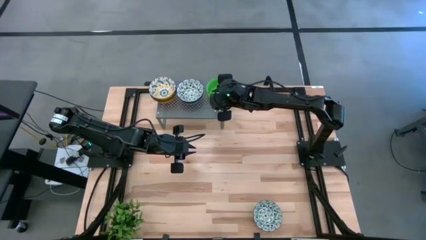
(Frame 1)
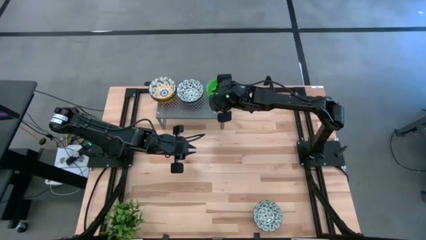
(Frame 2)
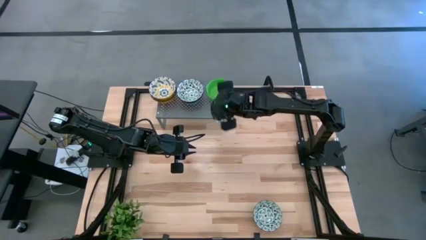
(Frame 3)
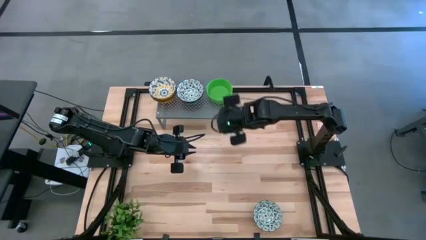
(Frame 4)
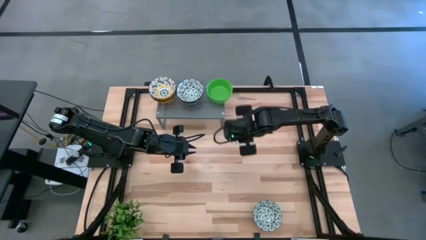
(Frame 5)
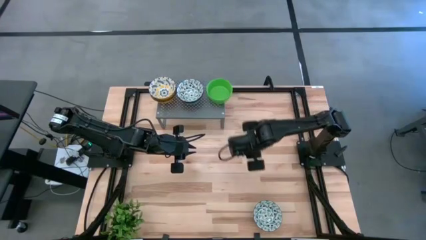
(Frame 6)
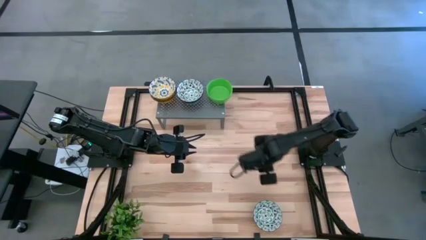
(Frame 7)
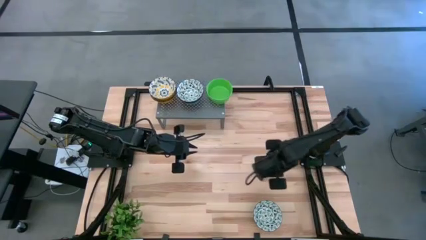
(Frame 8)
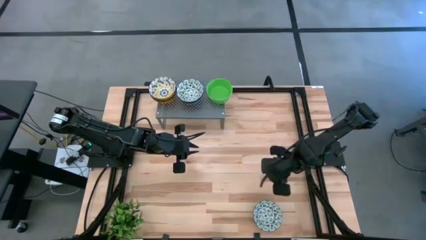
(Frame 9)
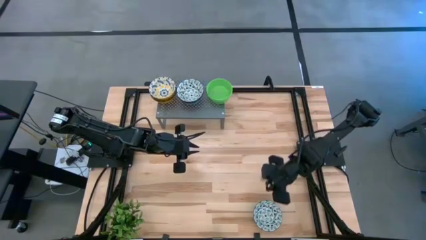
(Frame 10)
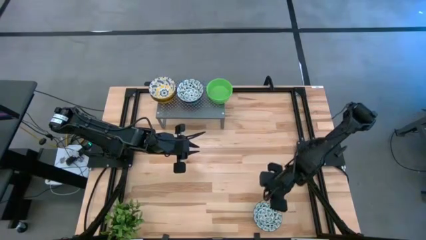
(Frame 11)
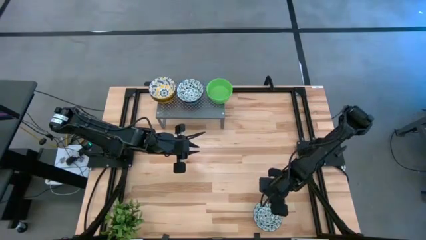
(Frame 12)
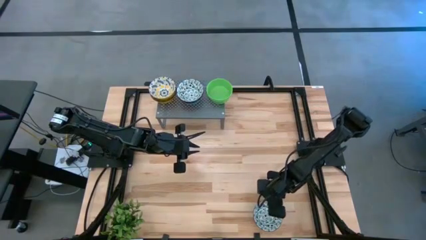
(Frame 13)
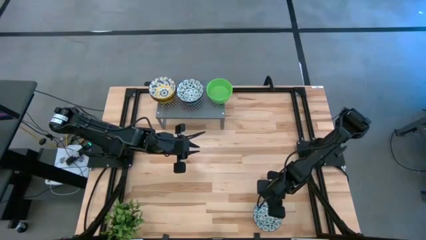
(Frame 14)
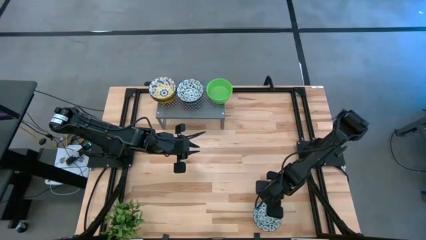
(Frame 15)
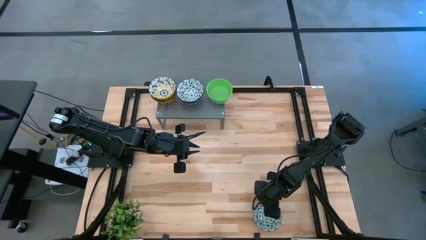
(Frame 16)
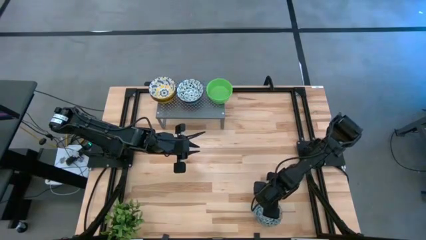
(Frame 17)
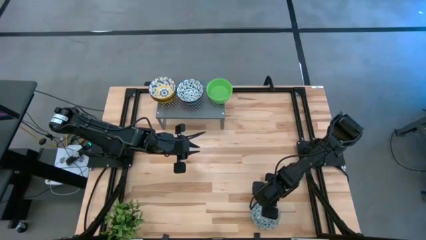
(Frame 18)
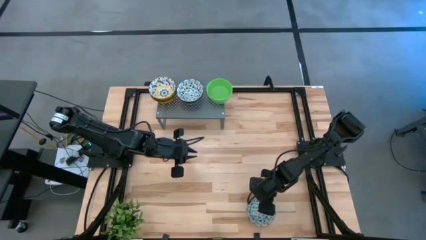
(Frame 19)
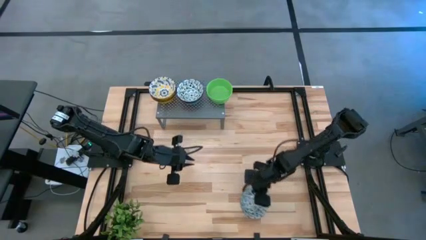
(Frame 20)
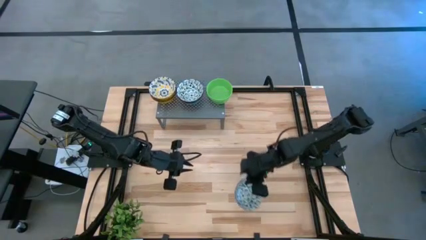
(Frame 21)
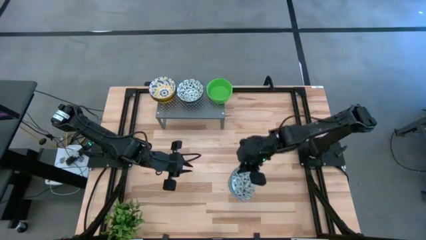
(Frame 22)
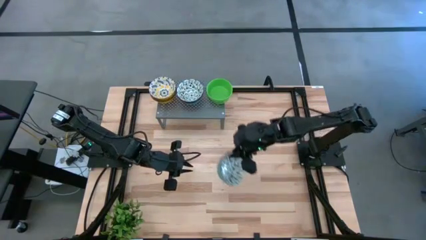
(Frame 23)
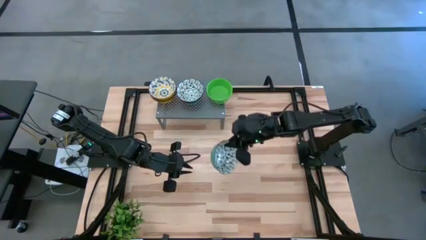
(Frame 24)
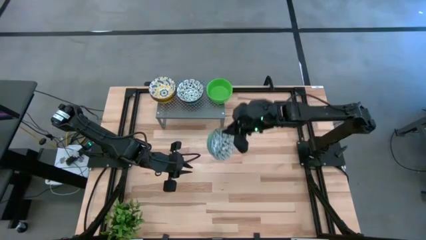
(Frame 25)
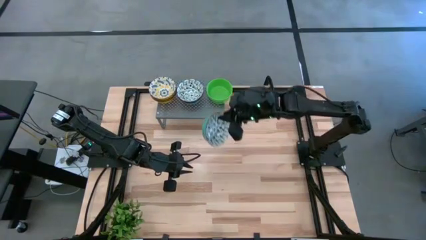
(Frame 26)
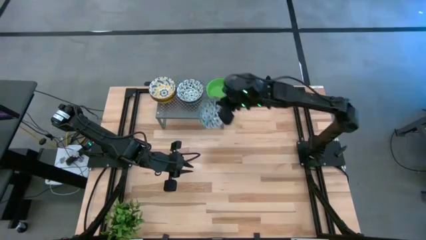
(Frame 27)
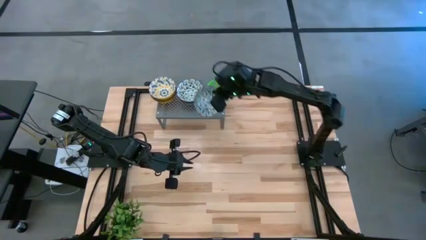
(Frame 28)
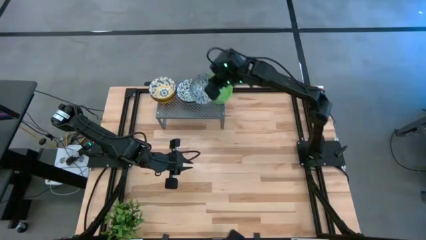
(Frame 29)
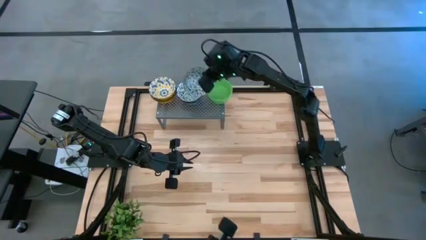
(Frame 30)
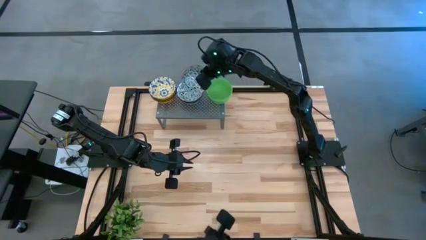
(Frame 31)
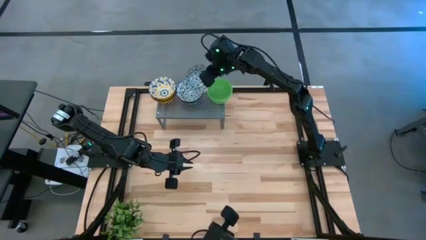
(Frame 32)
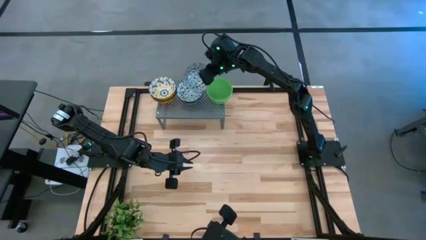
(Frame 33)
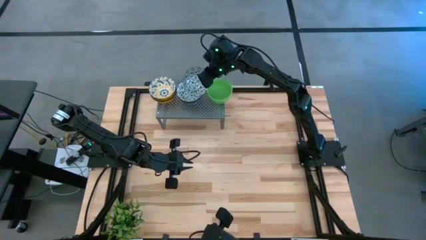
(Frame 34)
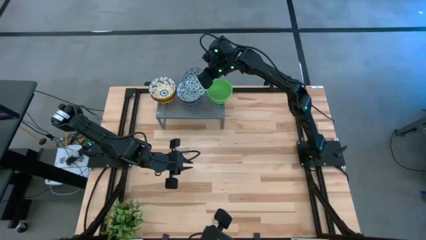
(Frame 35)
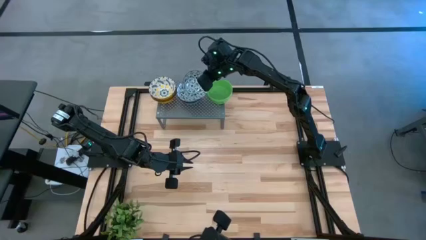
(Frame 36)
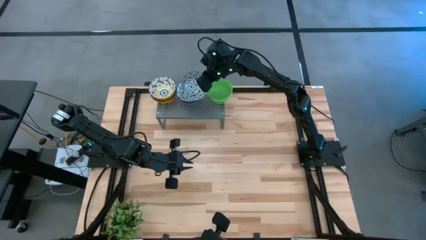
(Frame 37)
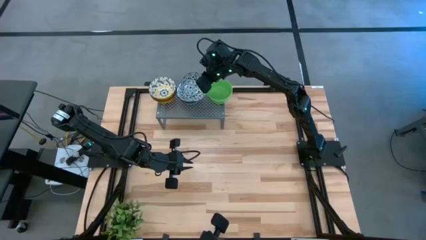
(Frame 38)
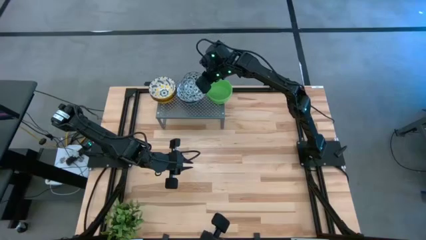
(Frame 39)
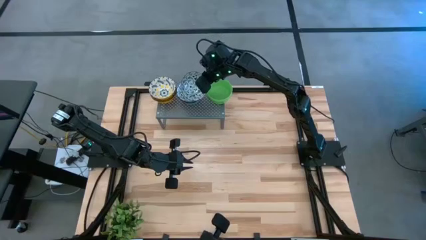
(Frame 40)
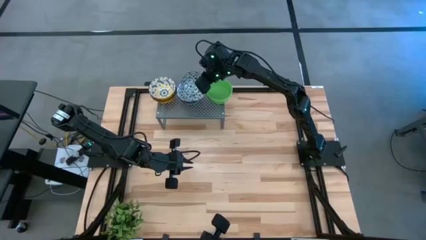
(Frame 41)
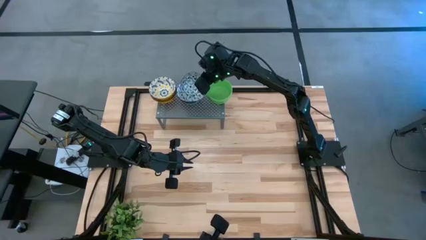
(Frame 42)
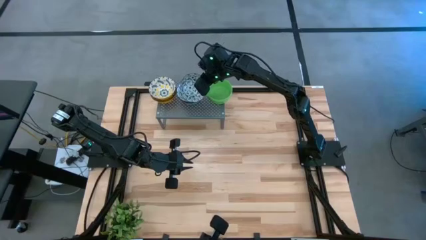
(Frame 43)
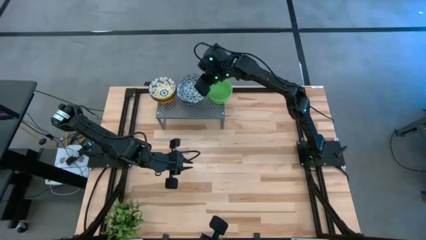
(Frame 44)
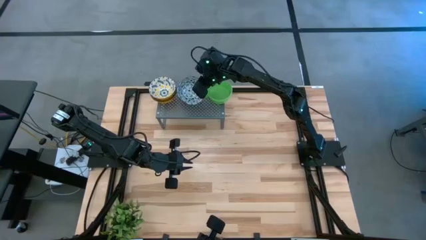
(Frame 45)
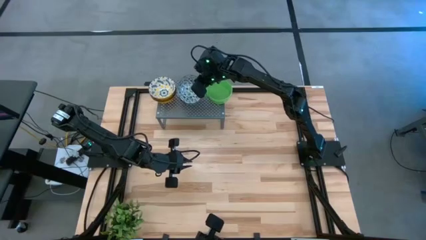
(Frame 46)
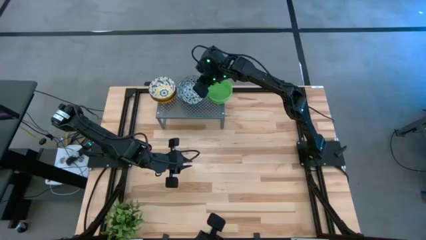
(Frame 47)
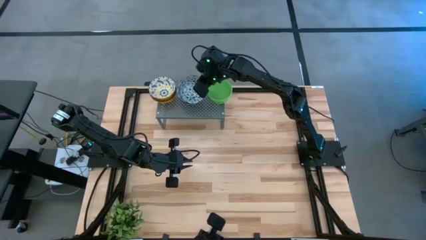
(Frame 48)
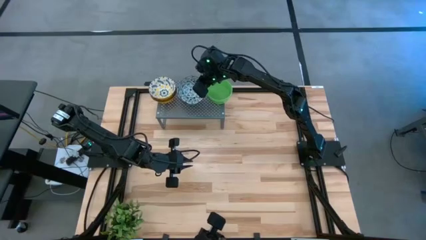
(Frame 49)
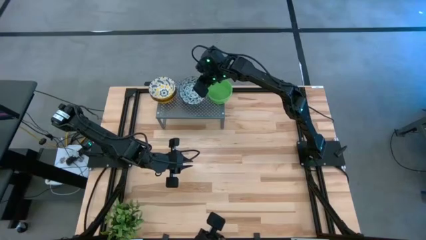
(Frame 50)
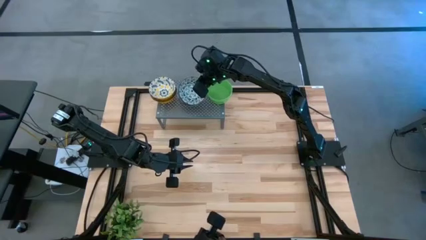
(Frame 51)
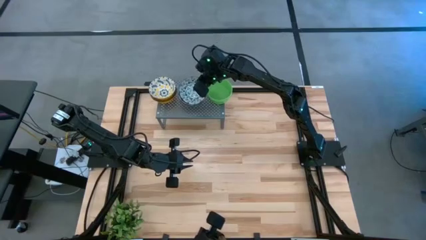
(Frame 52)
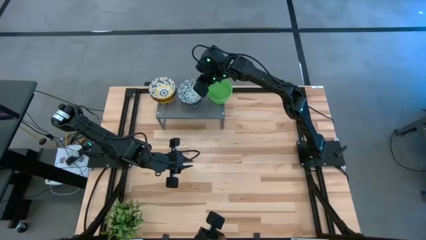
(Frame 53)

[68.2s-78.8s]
Task: Pick & Place Mini bowls
Stack the green patterned bowl on the green patterned bowl on the shelf

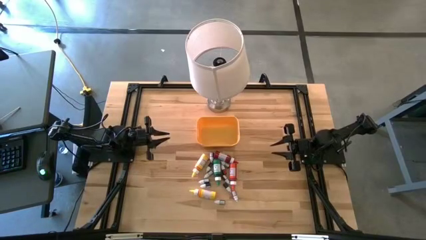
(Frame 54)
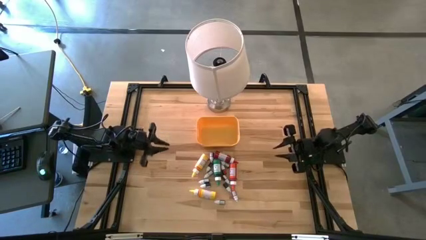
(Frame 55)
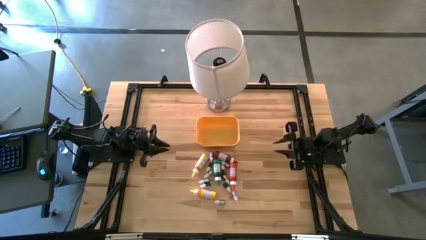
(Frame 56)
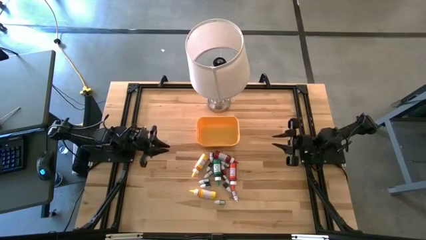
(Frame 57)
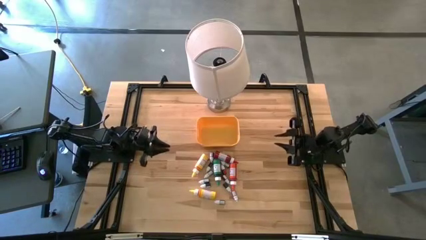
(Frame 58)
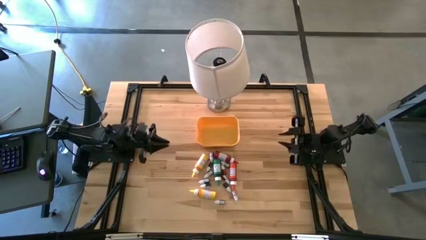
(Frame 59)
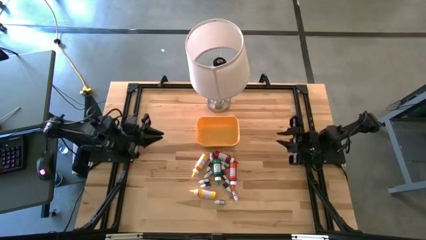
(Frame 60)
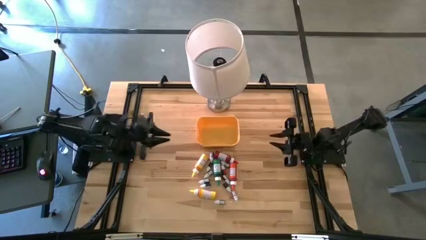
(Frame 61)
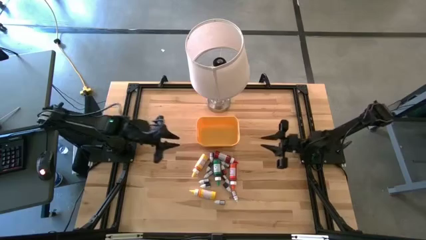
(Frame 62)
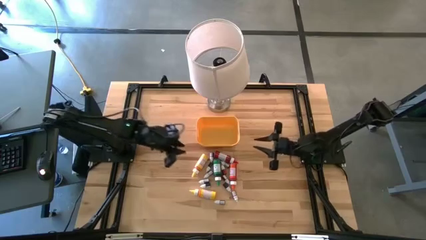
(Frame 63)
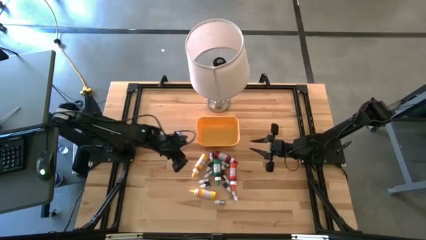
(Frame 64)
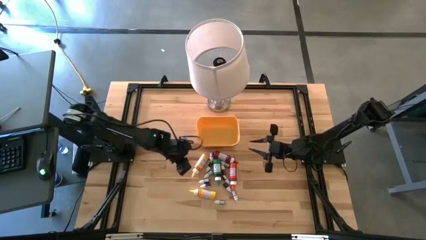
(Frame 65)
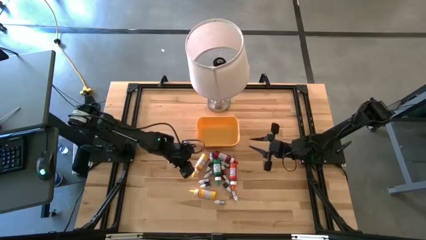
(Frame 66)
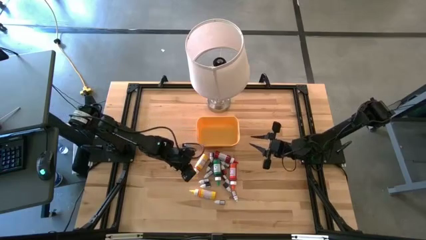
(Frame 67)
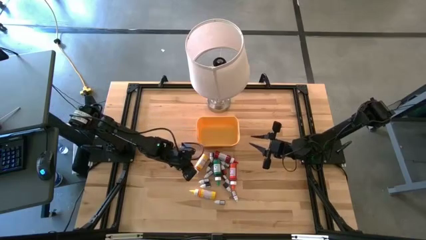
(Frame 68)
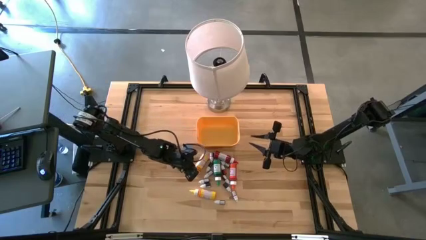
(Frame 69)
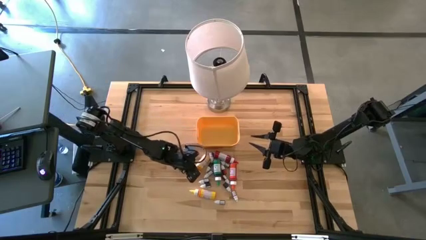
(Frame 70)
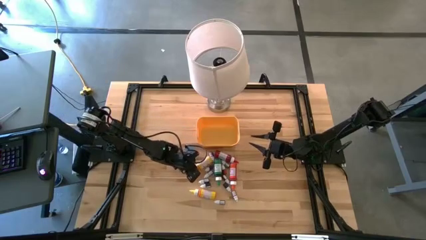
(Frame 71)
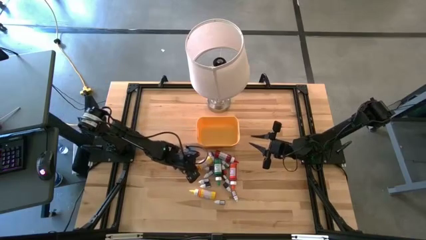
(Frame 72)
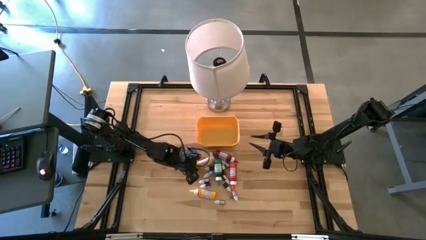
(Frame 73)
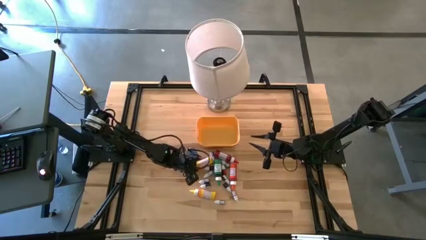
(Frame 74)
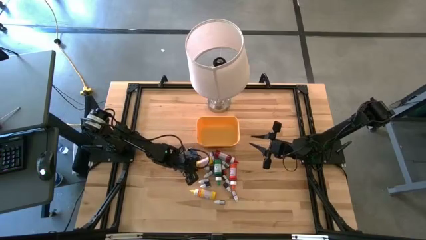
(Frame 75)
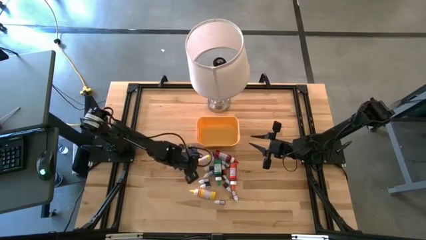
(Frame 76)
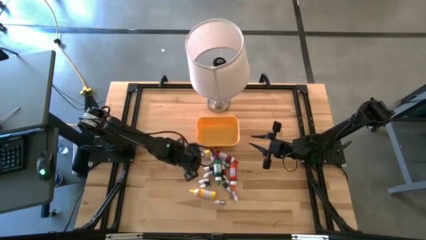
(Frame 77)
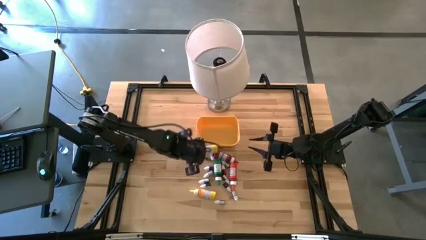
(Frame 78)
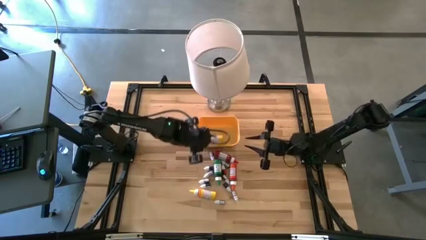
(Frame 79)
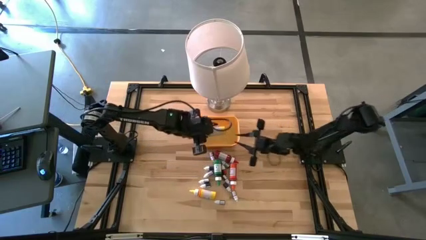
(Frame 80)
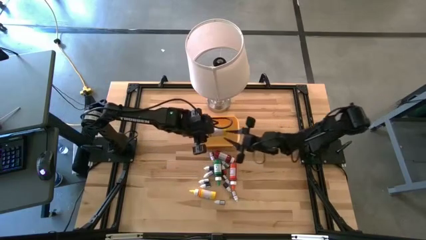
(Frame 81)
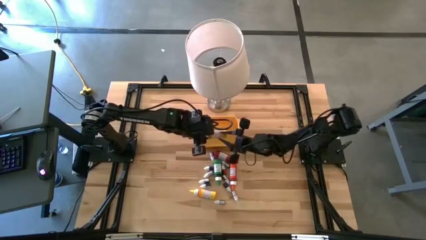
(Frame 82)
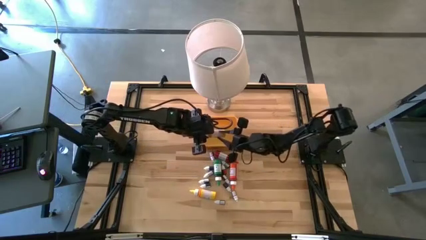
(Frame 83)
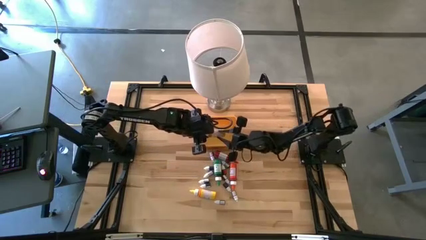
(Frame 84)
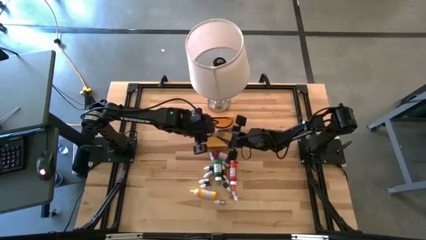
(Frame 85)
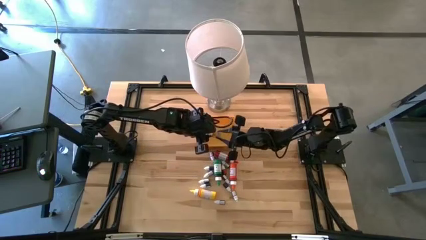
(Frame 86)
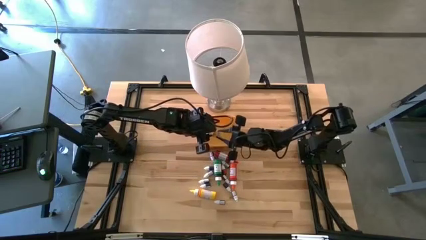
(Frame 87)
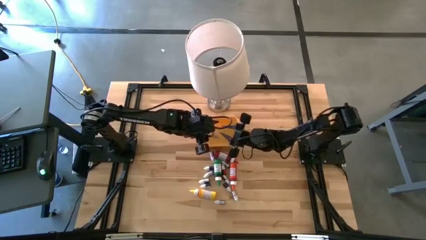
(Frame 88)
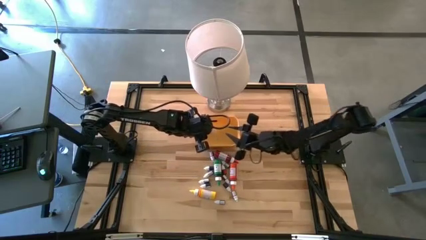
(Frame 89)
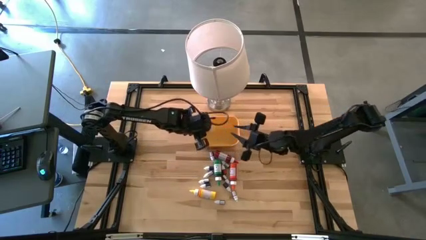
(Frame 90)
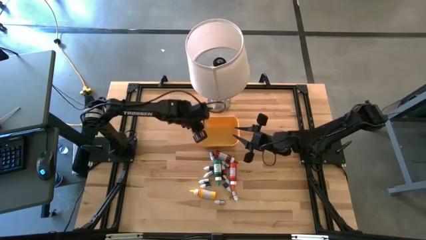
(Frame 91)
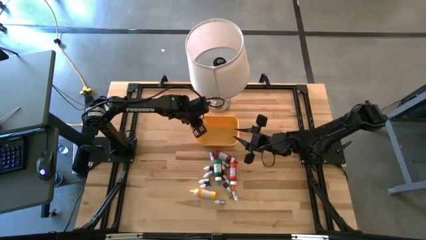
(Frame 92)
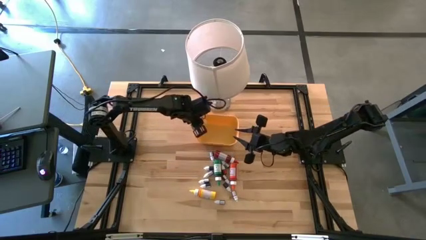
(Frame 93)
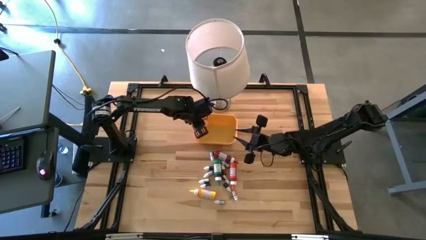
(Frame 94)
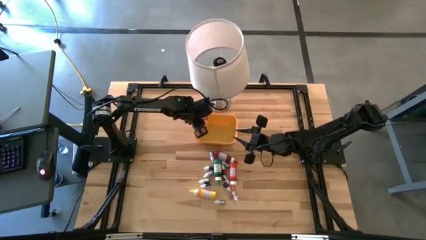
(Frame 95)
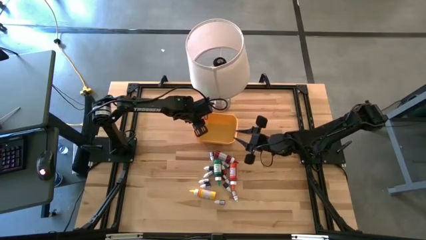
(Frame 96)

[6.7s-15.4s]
Task: Pick & Place food coloring
Put the yellow food coloring bottle into the yellow bin
